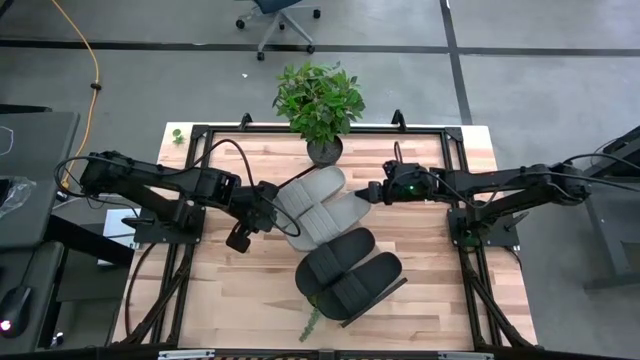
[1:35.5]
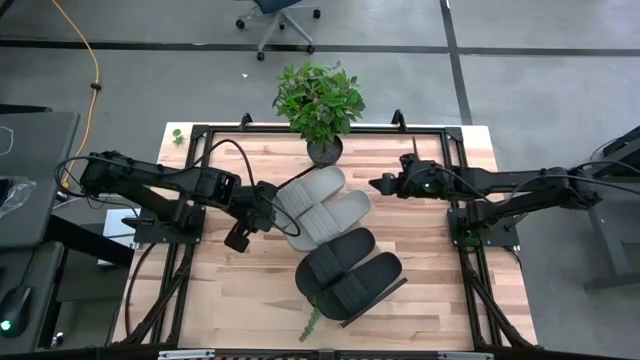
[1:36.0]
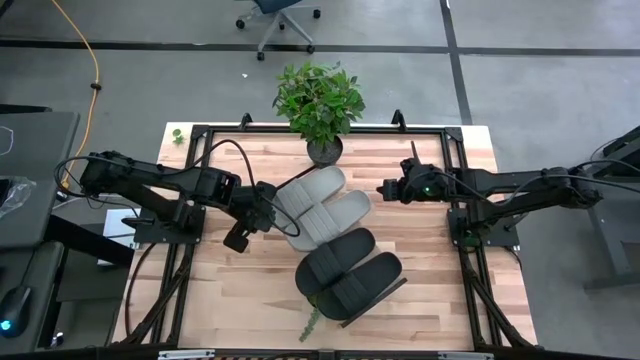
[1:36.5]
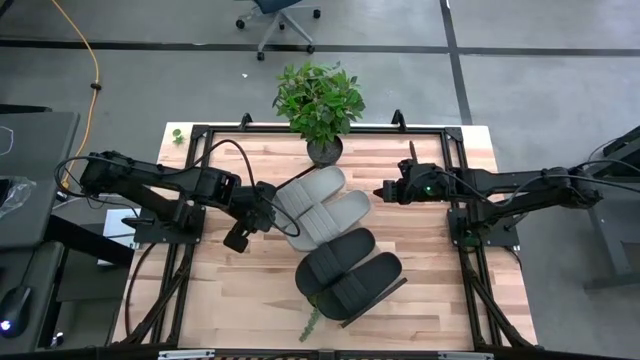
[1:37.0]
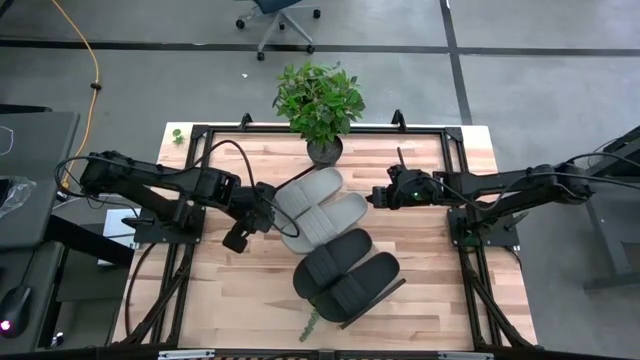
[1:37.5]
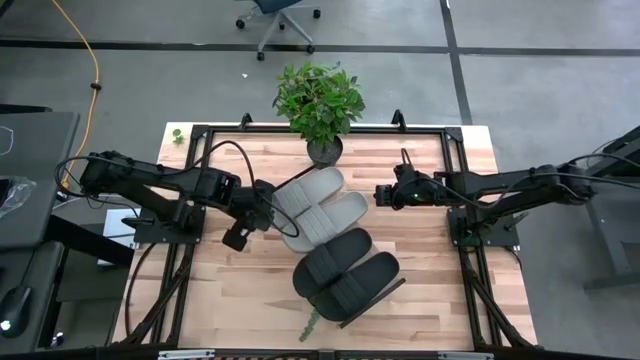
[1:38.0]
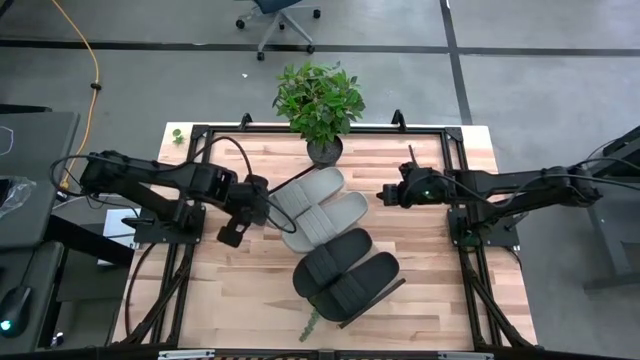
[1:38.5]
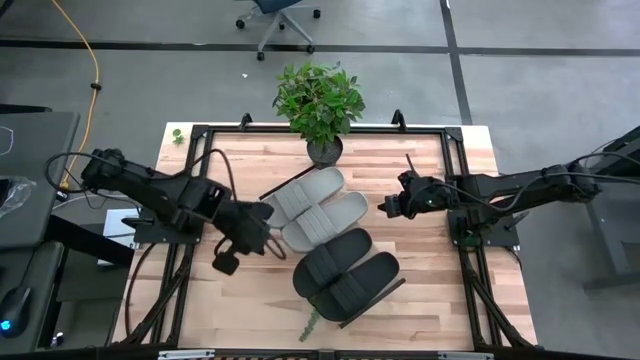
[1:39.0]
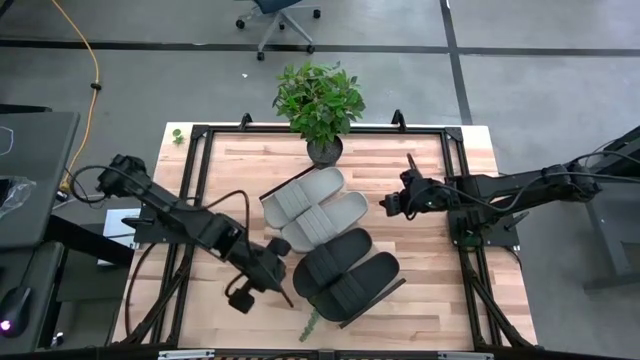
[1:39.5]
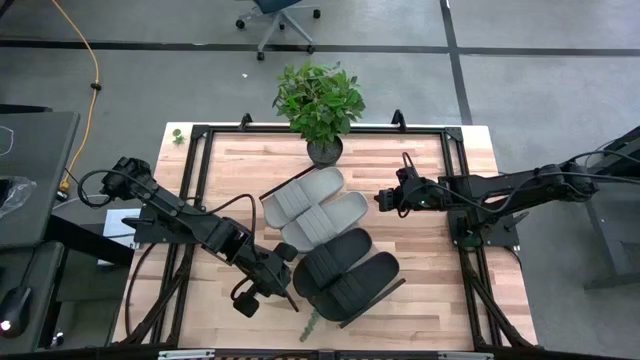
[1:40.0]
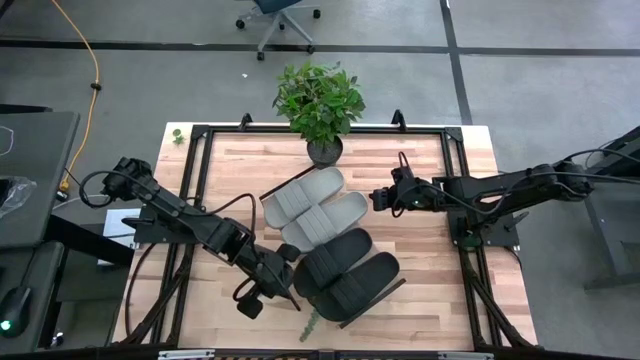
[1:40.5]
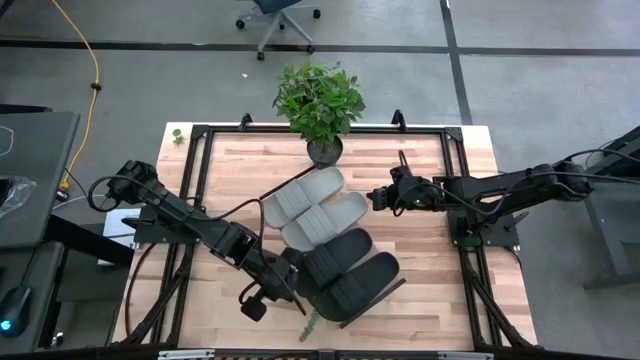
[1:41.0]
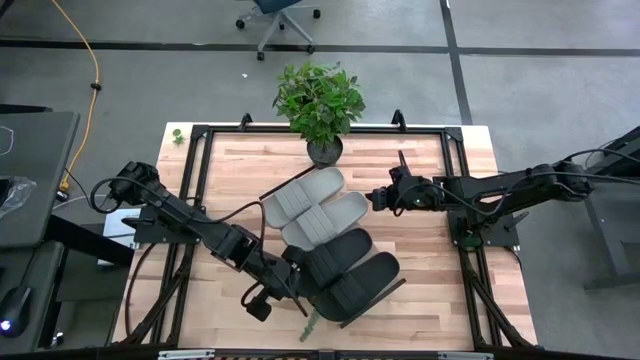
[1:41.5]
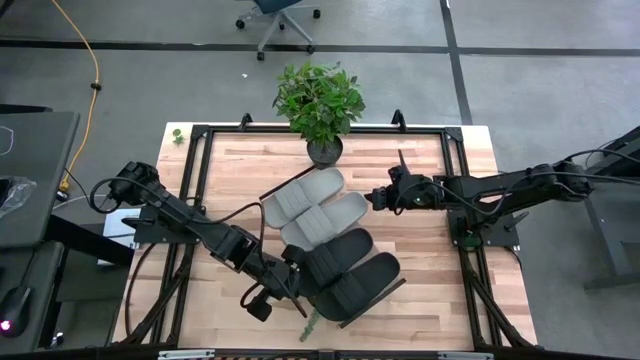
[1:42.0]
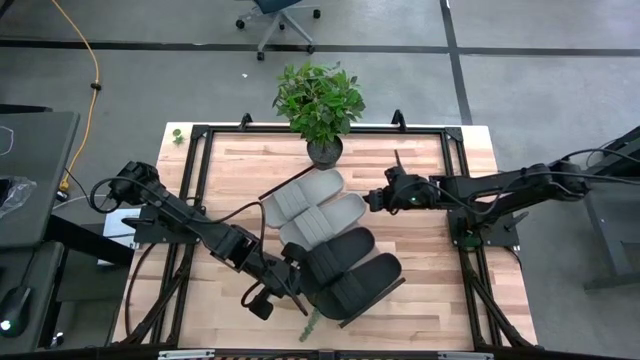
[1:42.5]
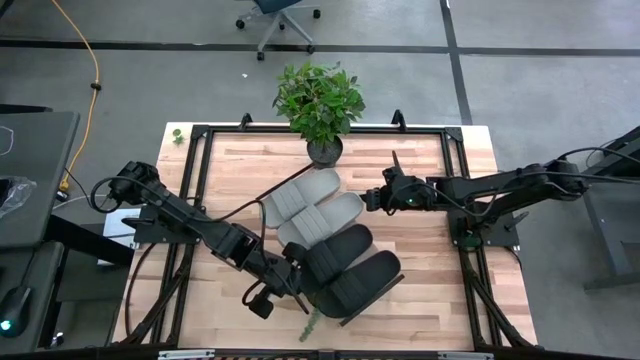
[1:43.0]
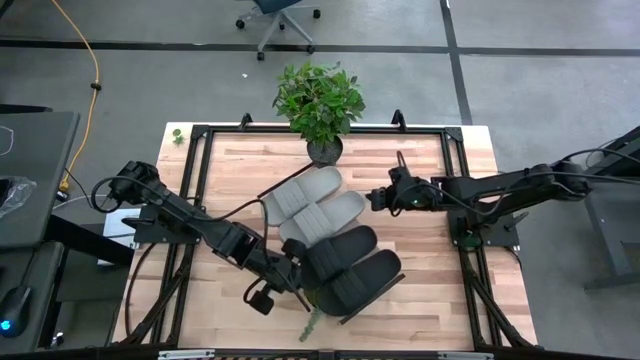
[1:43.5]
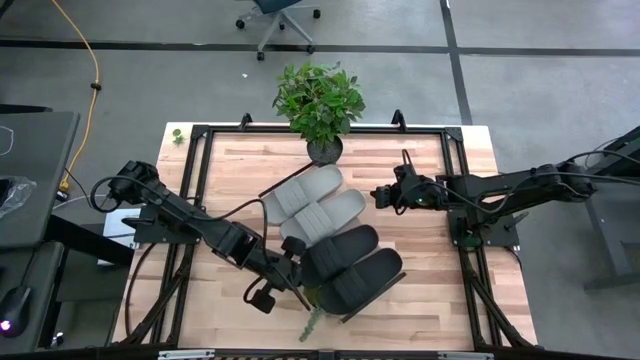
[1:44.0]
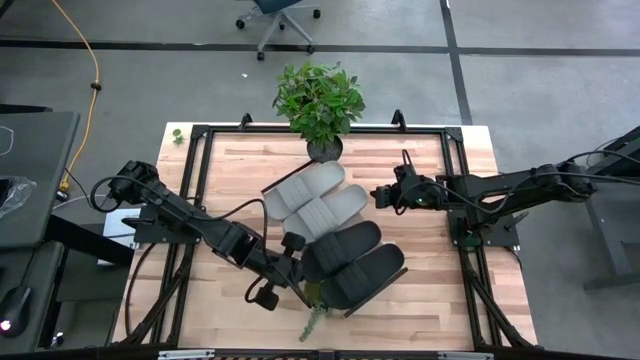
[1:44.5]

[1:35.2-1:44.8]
Task: Pick and place slides into the shelf
Adjust the white and black slides on the shelf

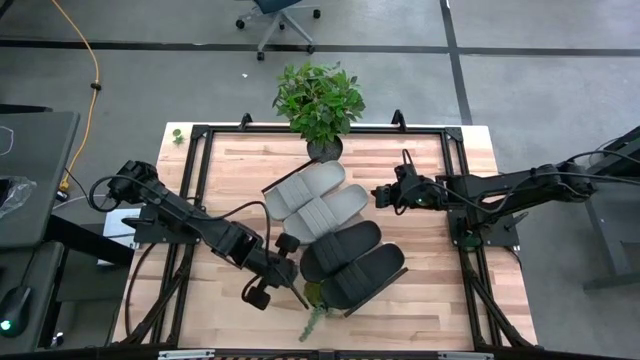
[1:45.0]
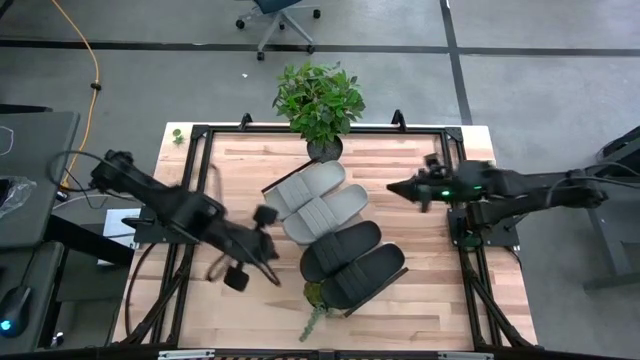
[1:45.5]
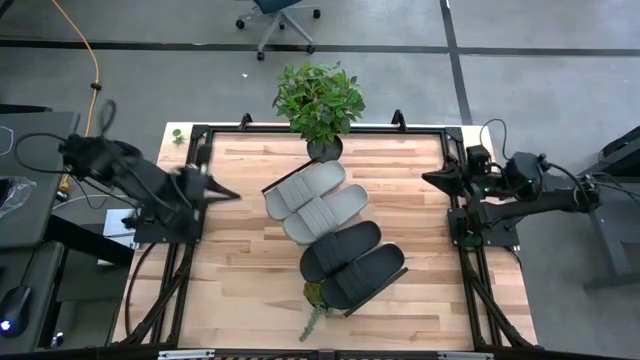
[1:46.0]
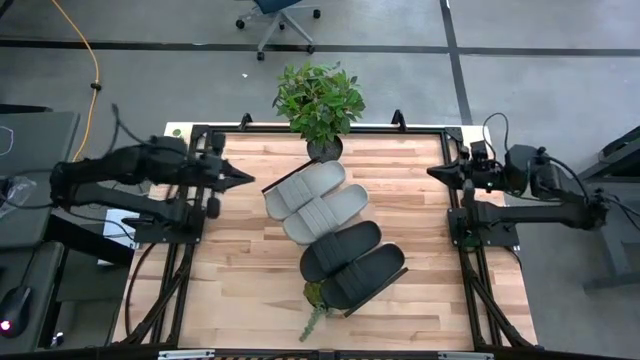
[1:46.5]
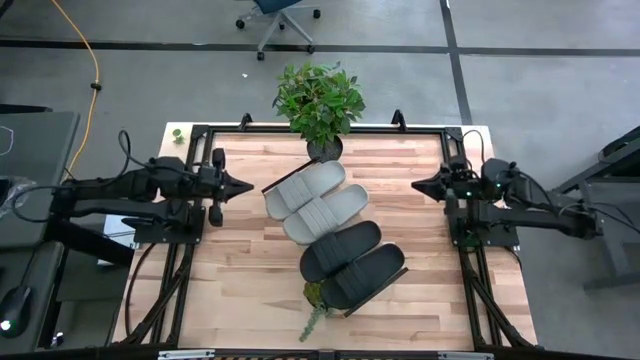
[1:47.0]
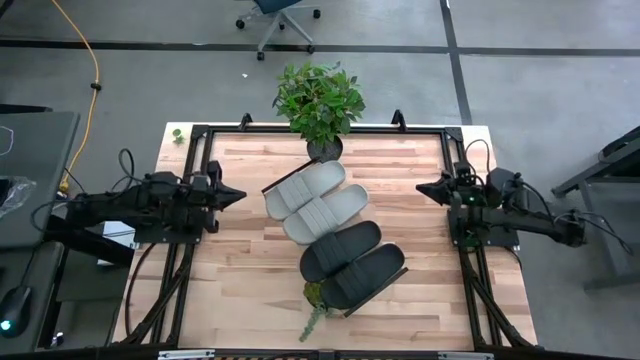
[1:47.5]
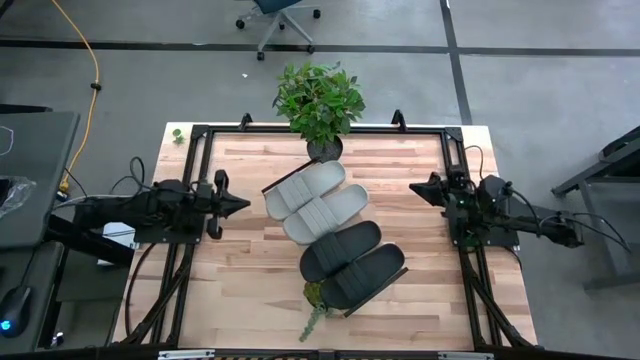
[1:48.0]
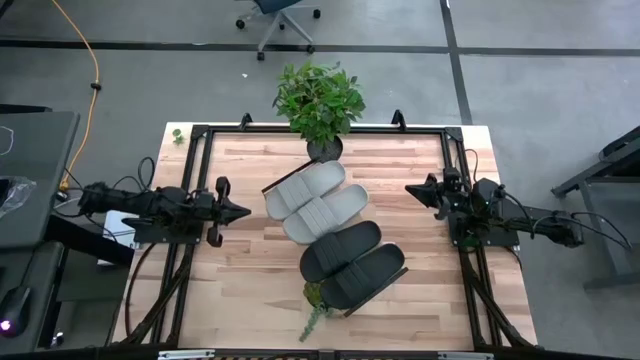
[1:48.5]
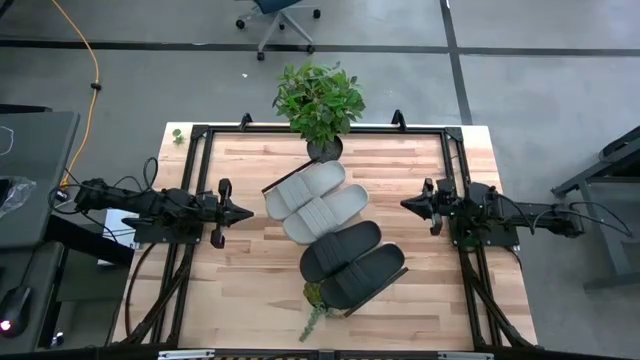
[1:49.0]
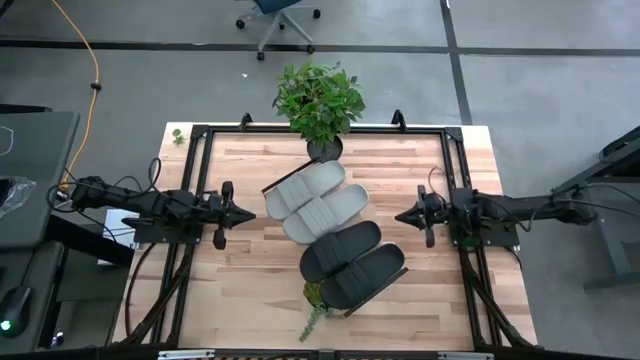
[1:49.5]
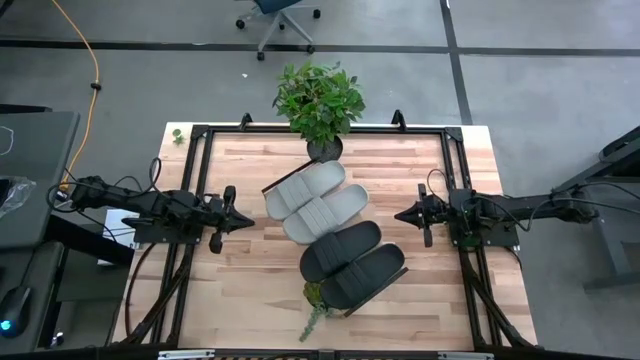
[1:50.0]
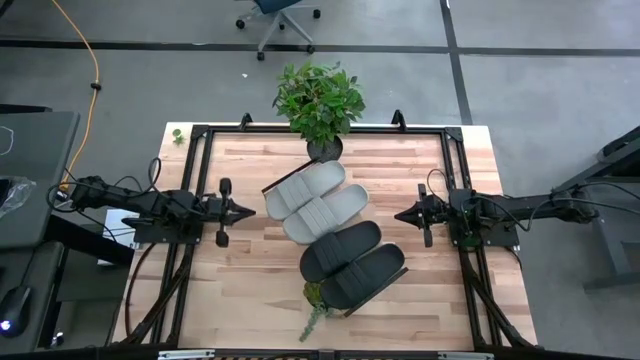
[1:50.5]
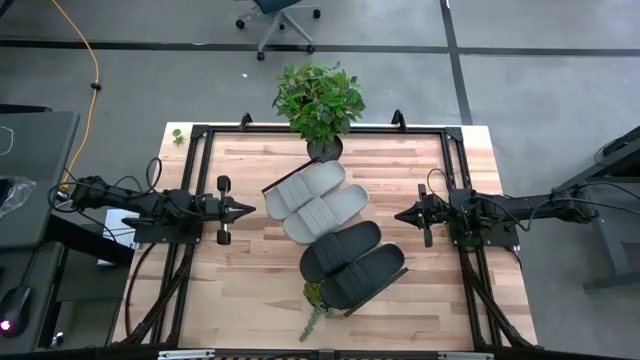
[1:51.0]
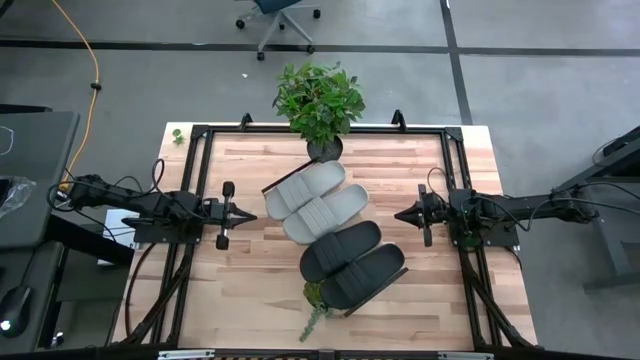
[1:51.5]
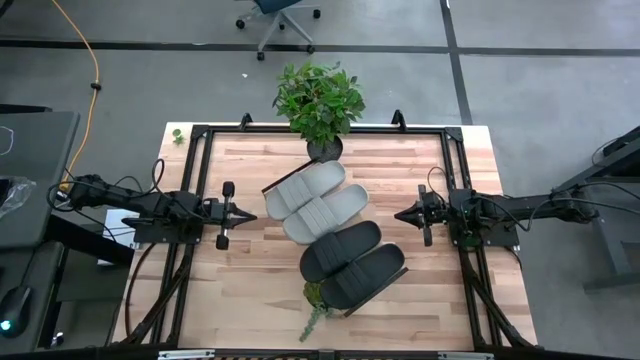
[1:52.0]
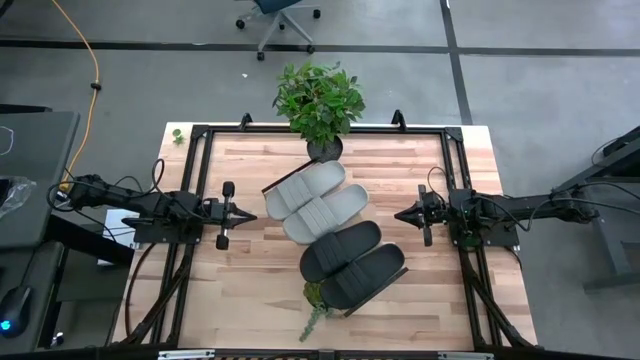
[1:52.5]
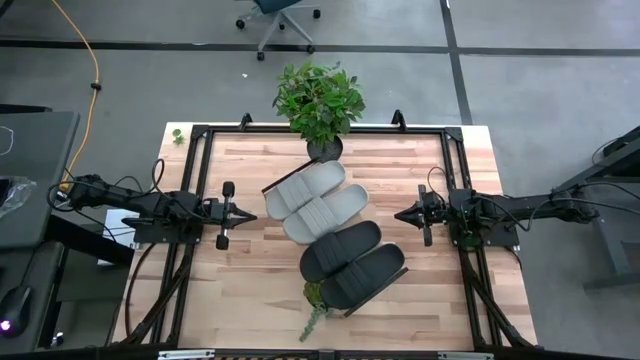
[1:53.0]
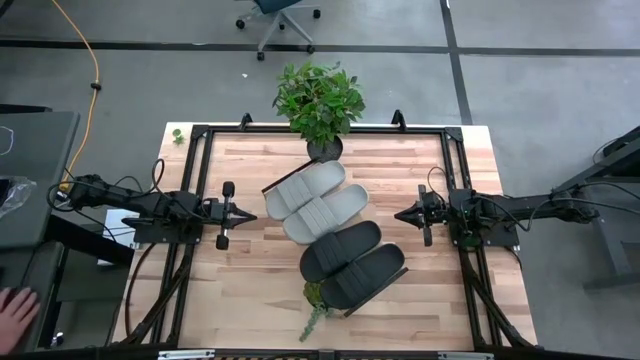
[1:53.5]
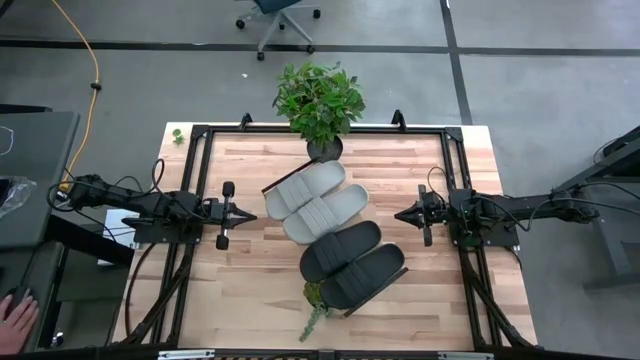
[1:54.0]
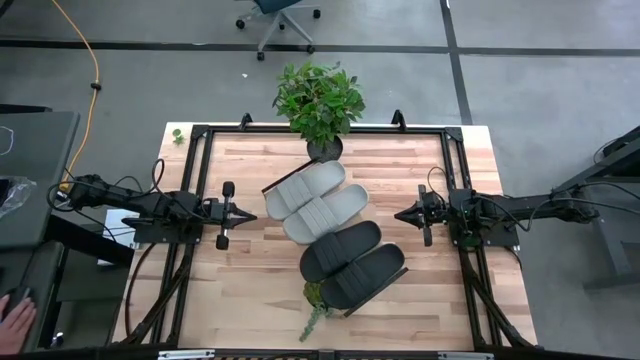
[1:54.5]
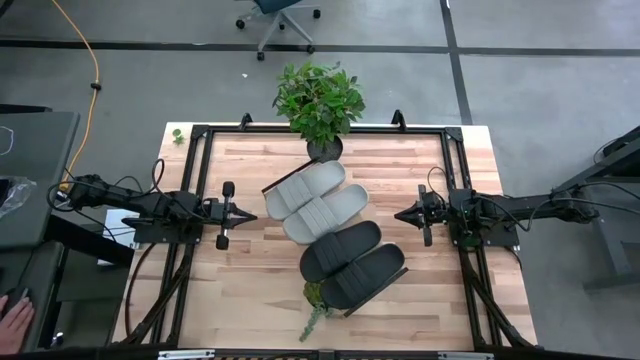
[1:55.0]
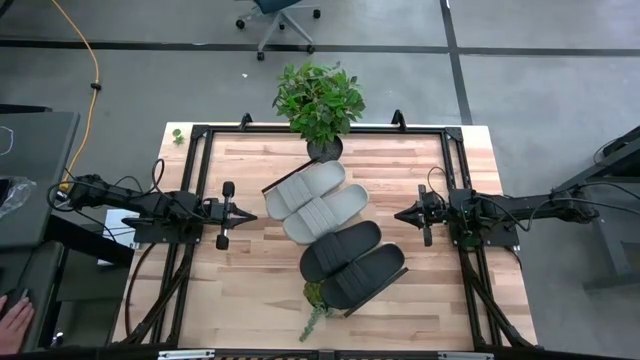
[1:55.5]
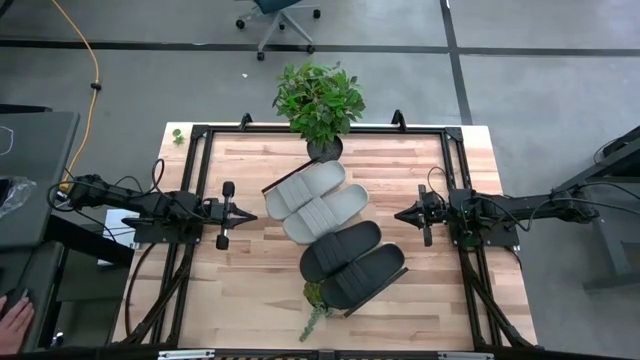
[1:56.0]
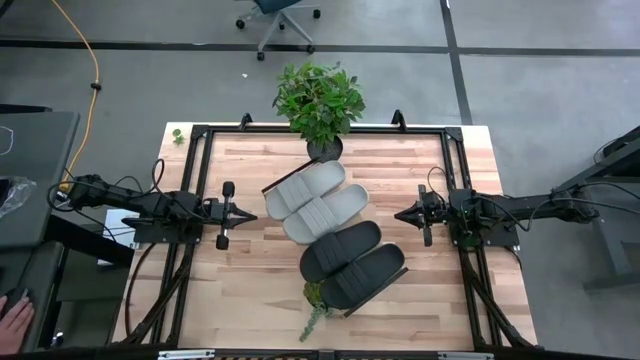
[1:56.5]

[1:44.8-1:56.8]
Return to Home Position
